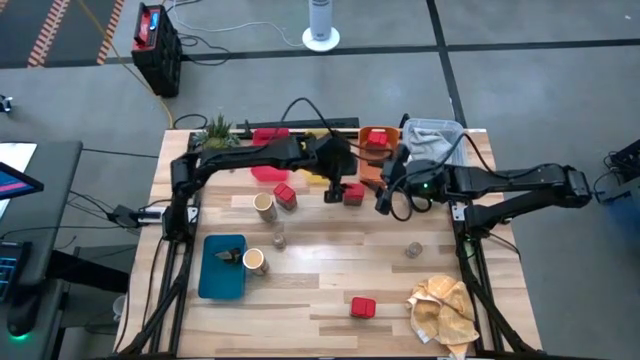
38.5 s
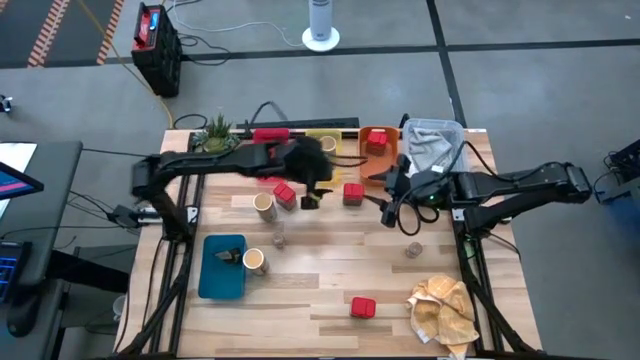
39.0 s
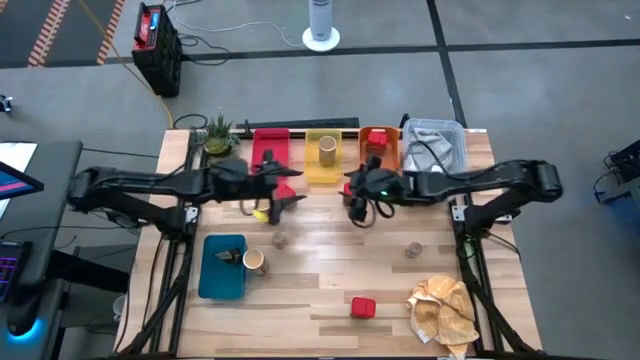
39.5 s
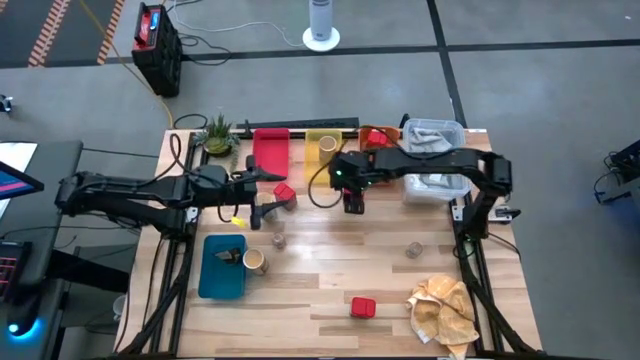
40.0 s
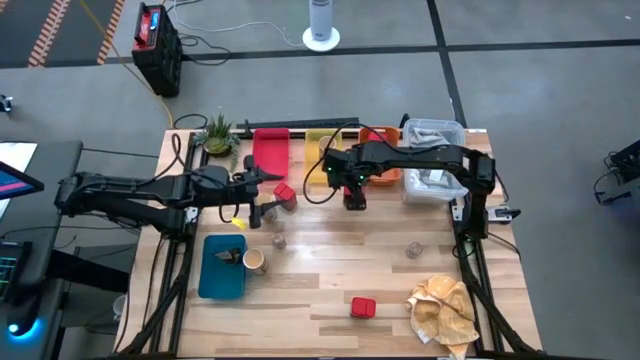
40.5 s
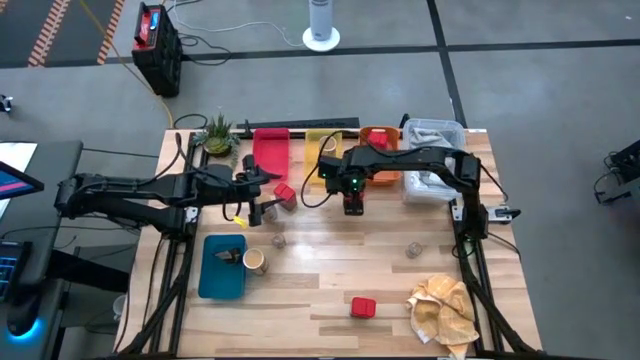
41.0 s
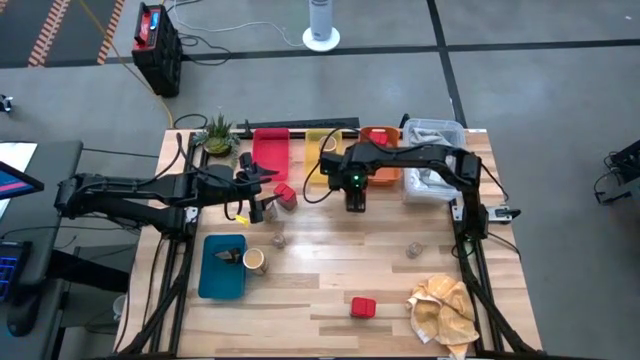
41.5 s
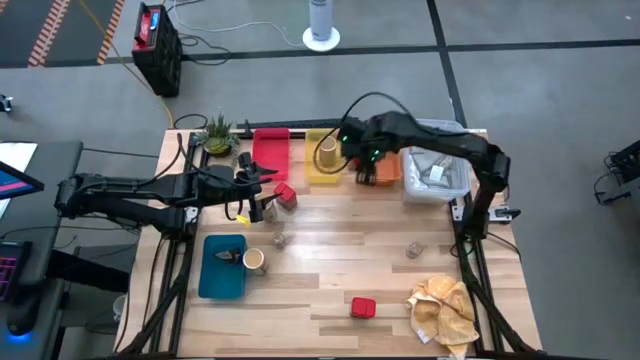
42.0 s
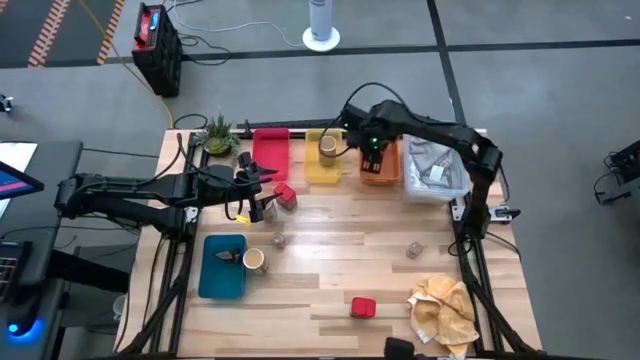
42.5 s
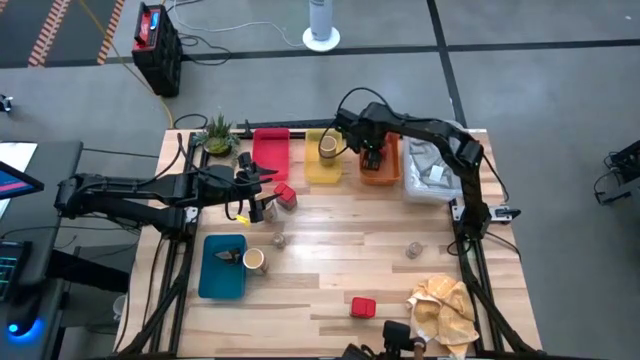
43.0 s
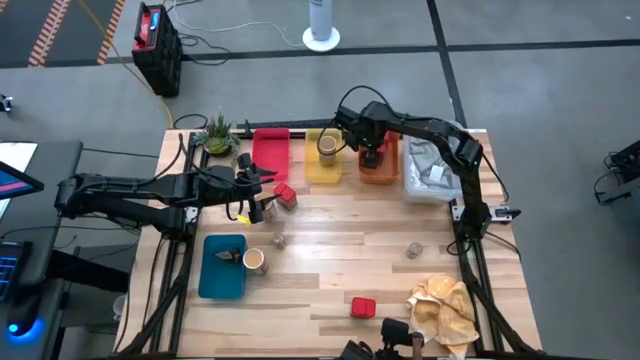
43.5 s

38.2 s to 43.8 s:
Task: Sort spices by type
Put the red seasoning can into the orange bin

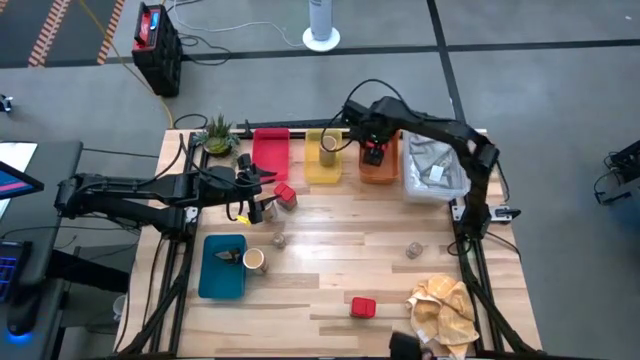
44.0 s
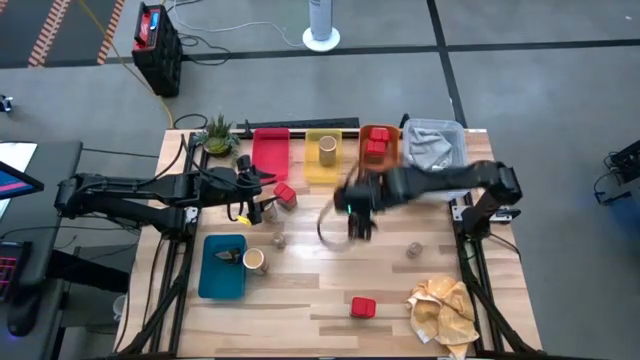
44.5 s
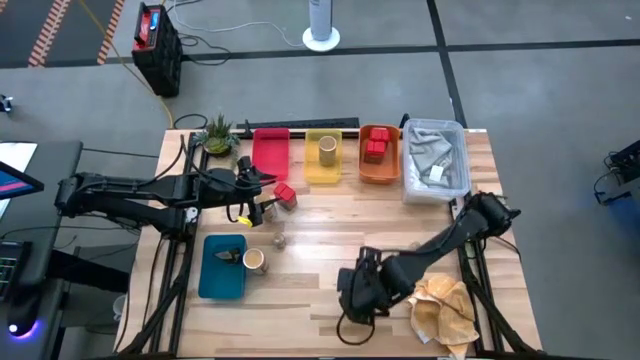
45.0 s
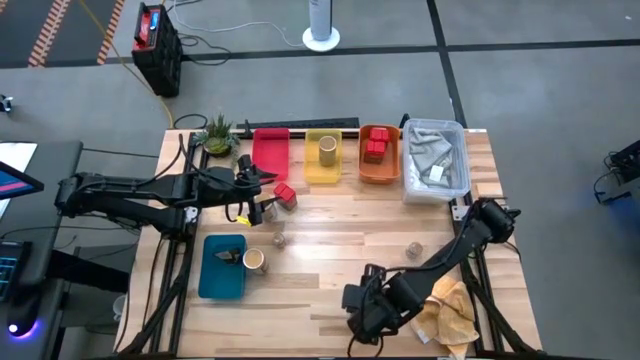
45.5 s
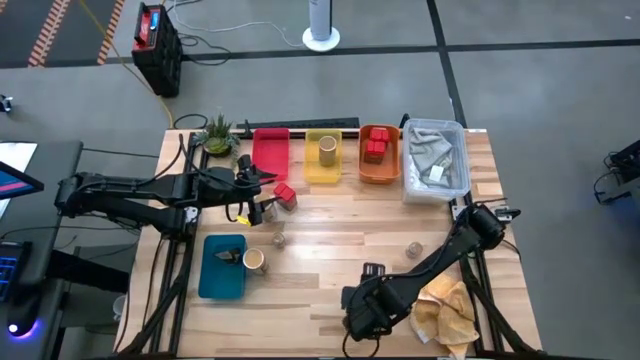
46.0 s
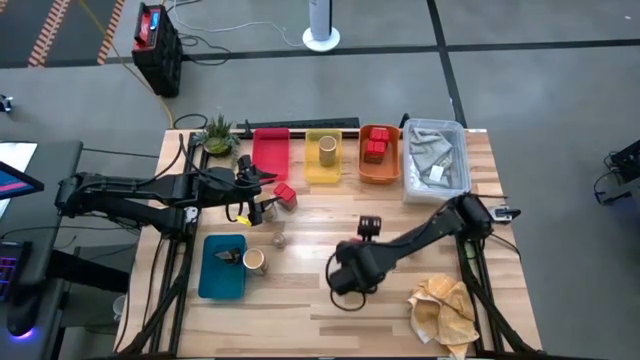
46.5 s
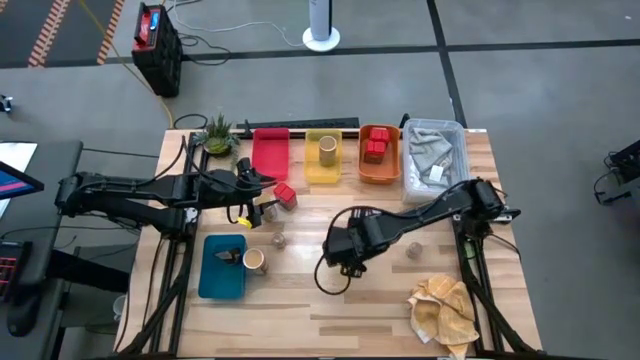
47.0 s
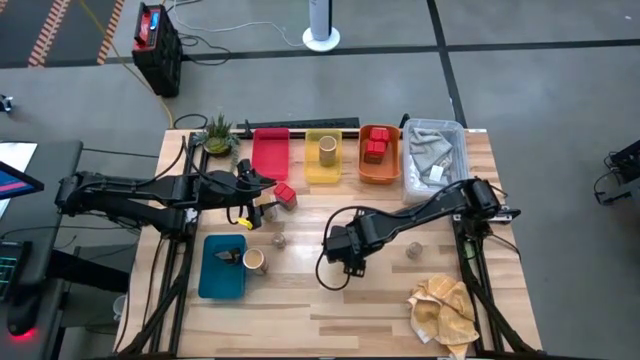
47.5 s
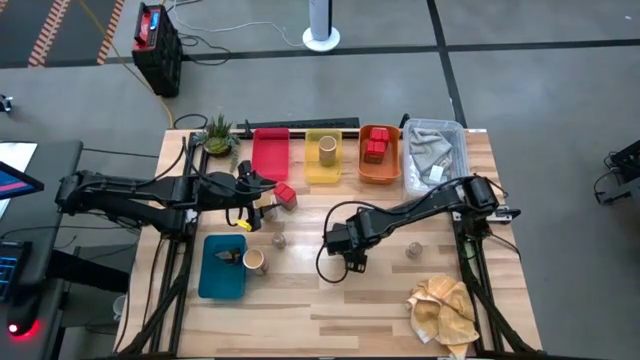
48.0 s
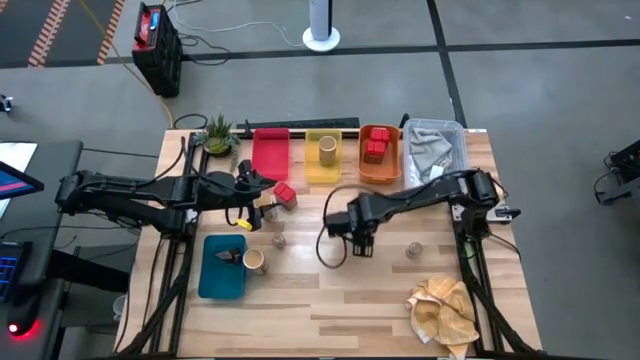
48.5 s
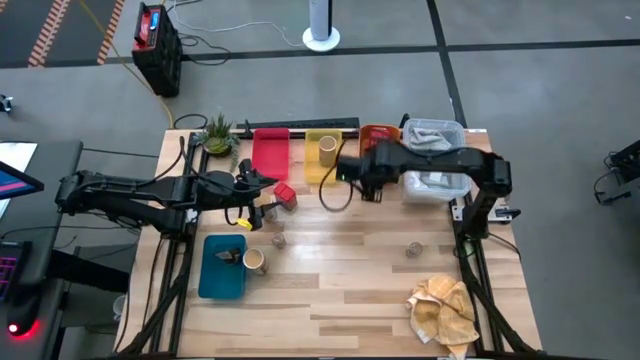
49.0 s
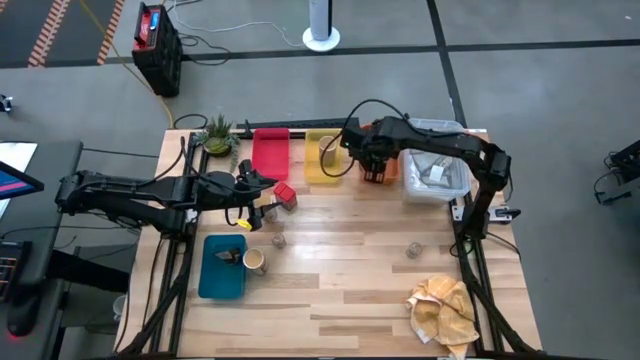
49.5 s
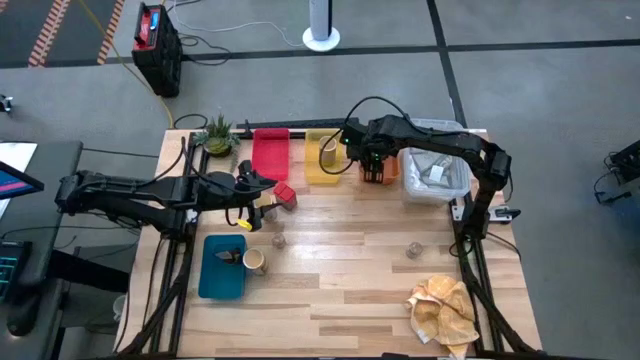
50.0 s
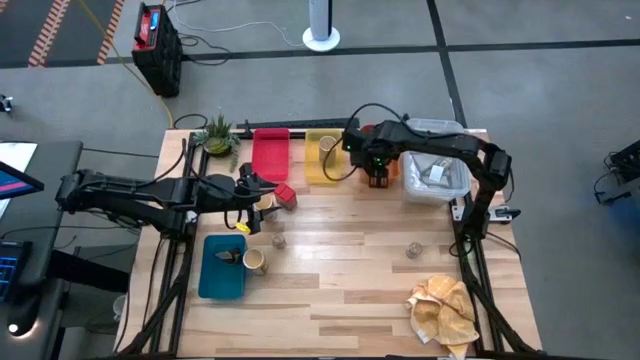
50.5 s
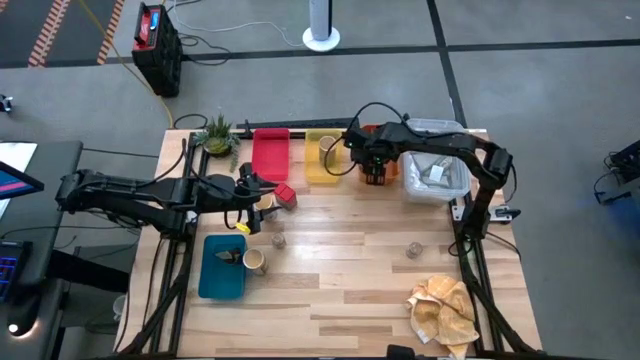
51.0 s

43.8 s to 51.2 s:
Put the red seasoning can into the orange bin

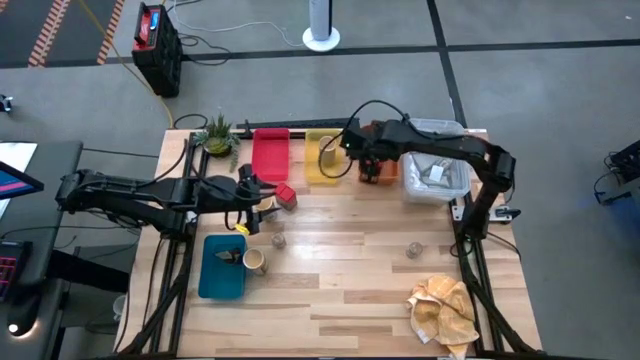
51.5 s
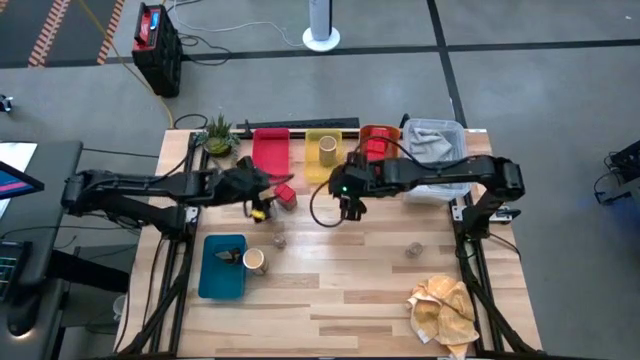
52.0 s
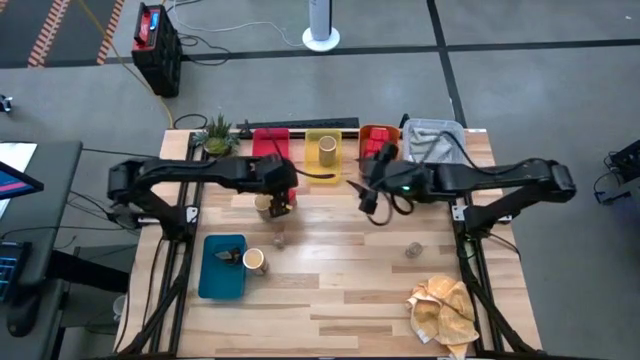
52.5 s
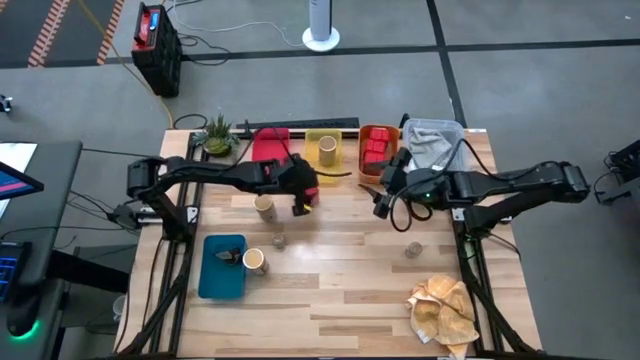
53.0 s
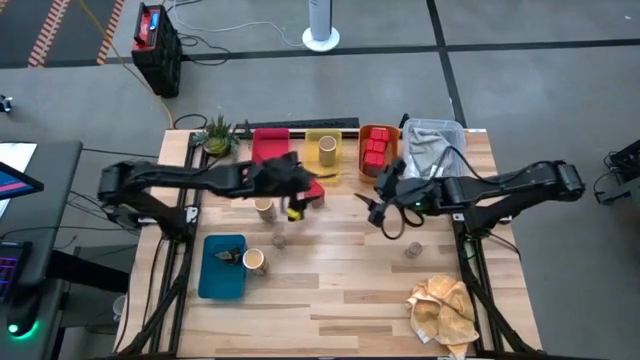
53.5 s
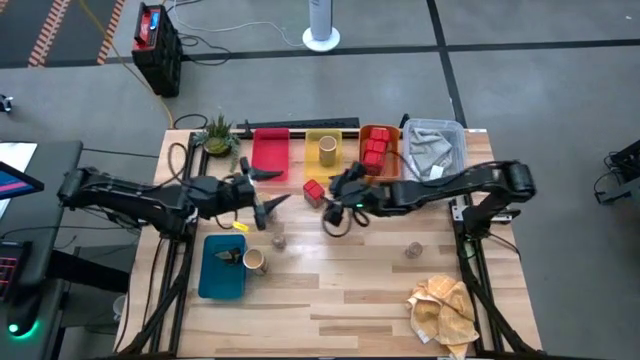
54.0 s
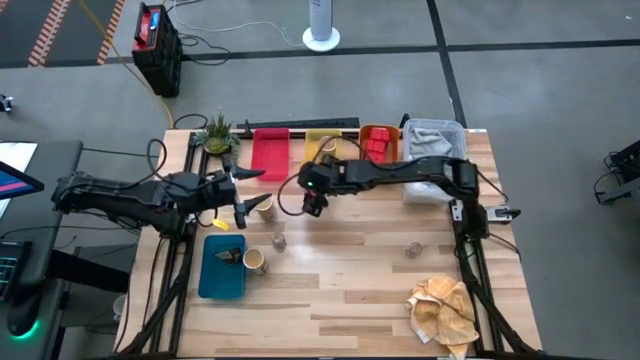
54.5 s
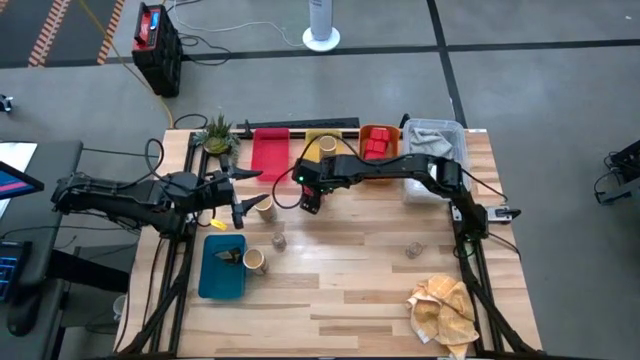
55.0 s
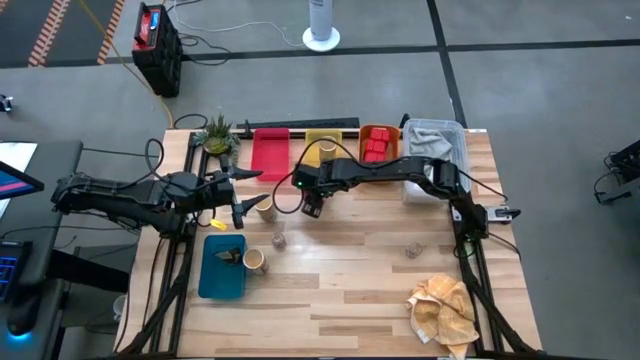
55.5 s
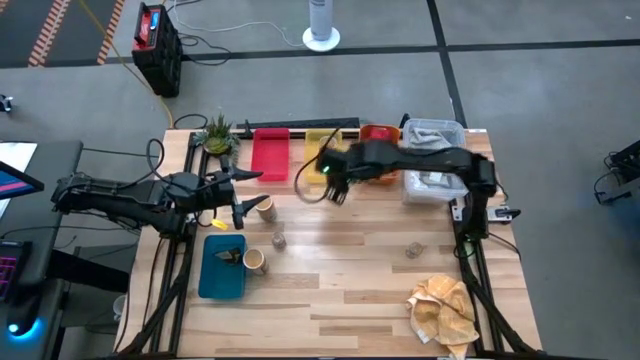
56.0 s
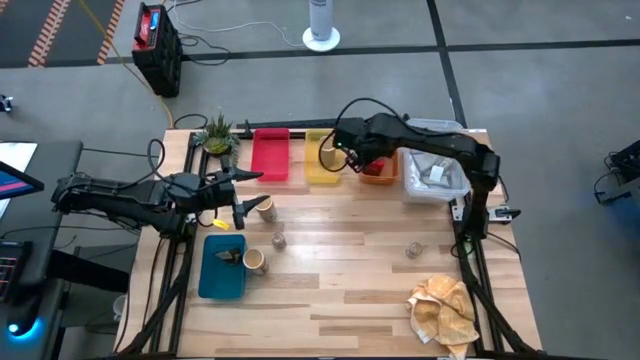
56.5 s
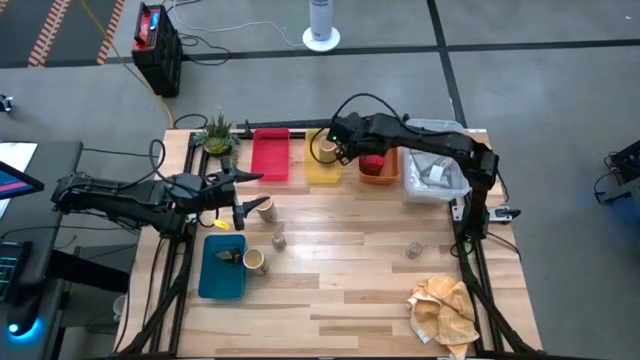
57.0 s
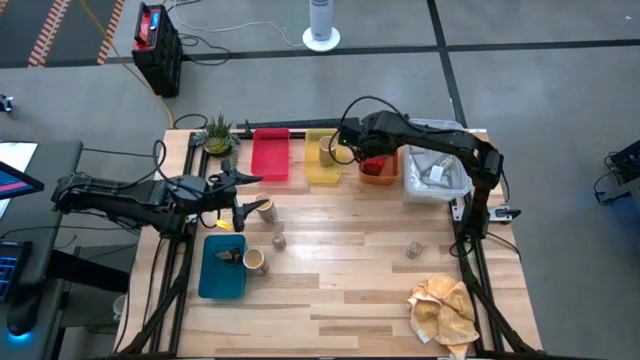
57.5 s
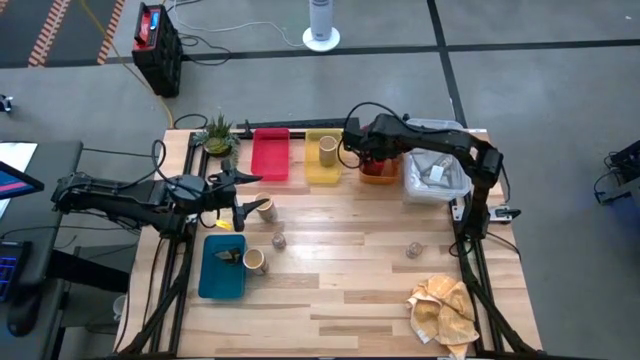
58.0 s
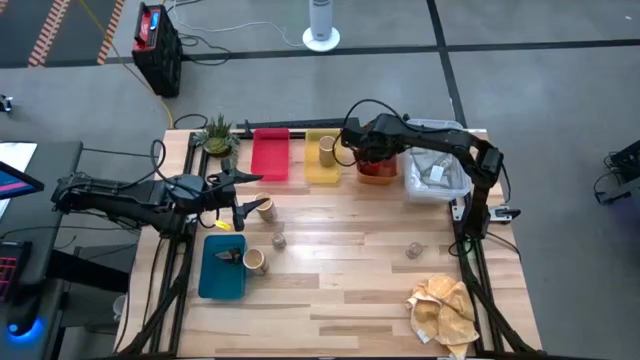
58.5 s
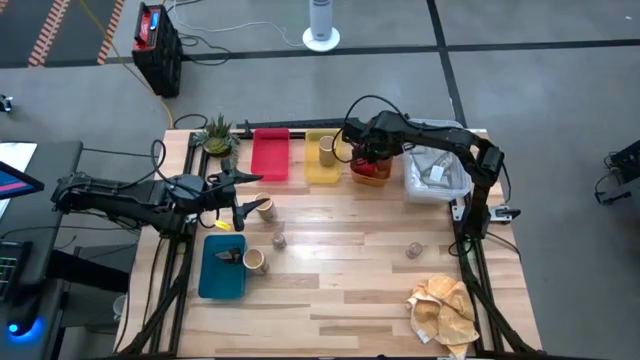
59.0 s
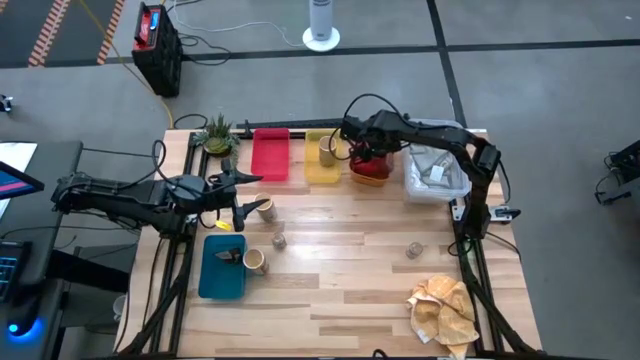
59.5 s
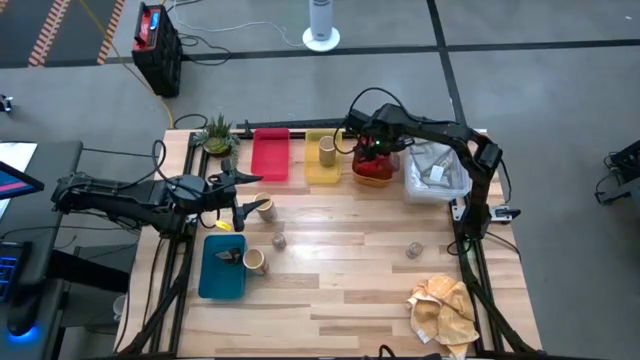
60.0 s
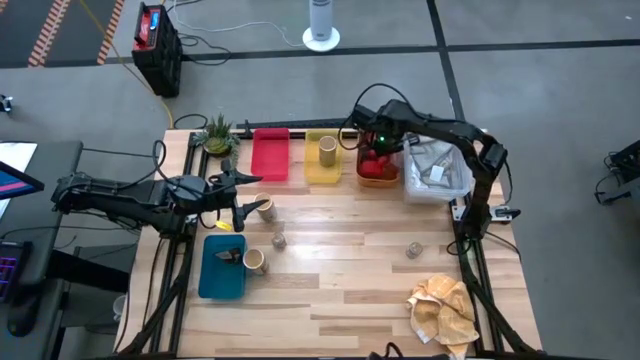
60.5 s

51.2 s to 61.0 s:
Put the red seasoning can into the orange bin
